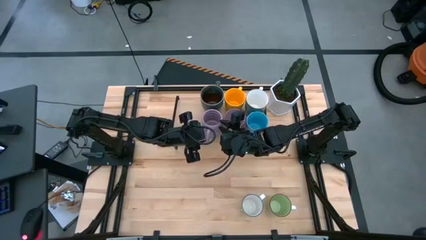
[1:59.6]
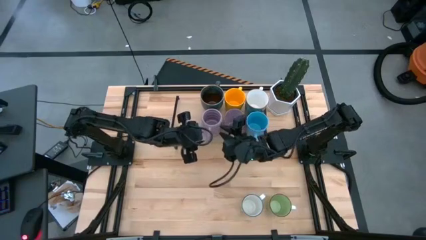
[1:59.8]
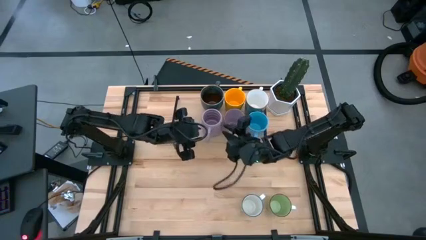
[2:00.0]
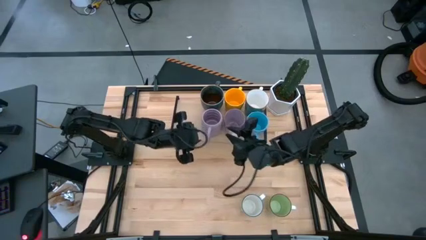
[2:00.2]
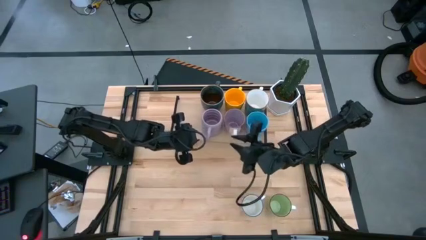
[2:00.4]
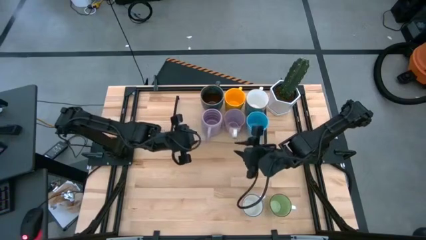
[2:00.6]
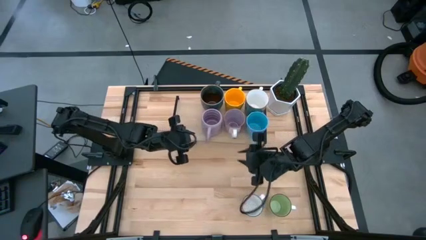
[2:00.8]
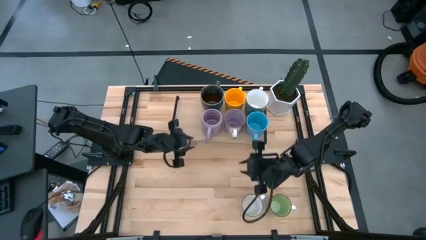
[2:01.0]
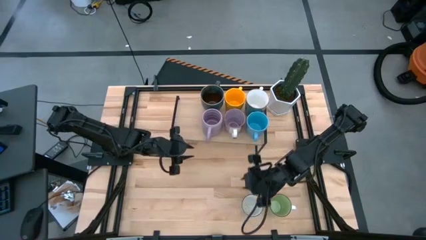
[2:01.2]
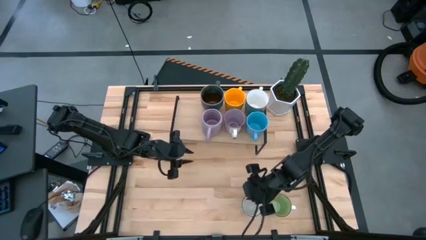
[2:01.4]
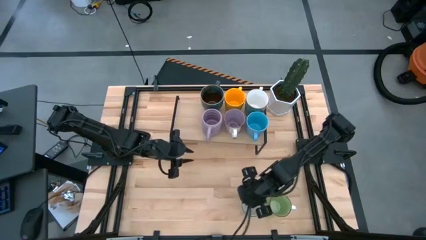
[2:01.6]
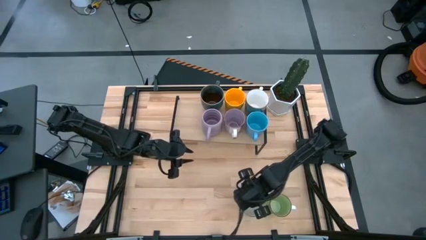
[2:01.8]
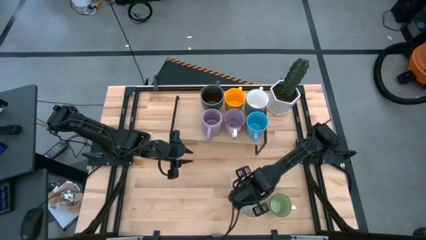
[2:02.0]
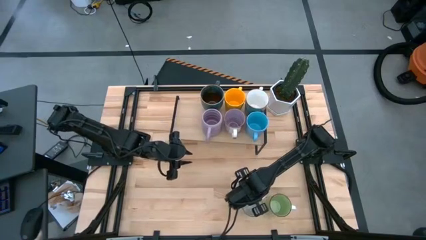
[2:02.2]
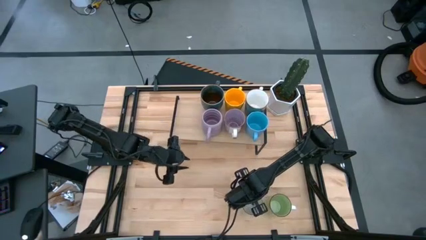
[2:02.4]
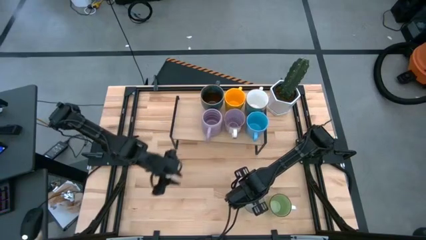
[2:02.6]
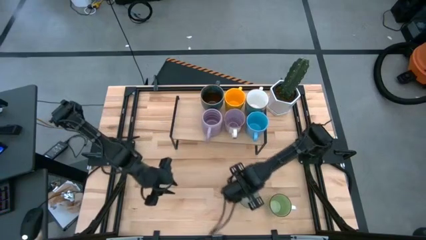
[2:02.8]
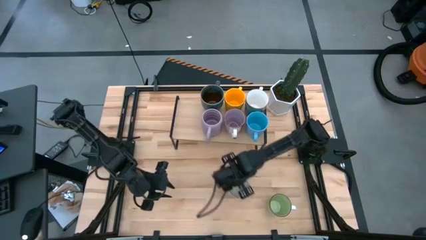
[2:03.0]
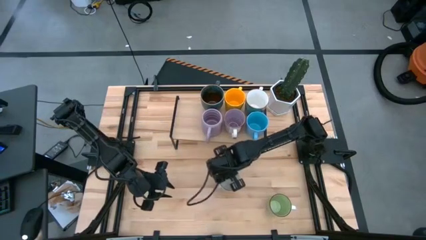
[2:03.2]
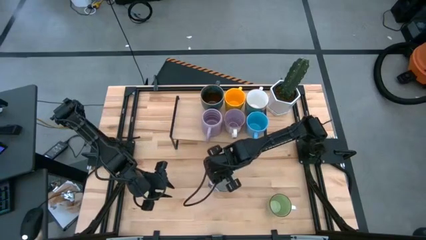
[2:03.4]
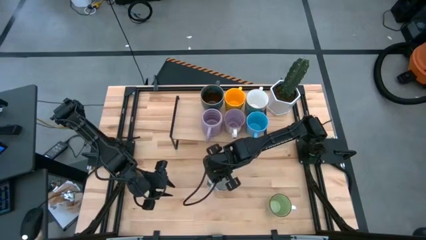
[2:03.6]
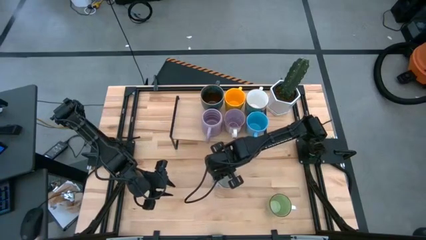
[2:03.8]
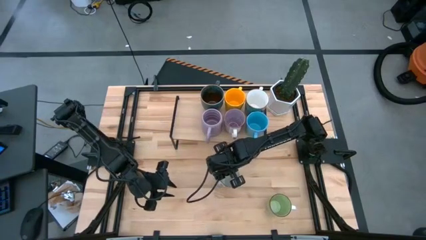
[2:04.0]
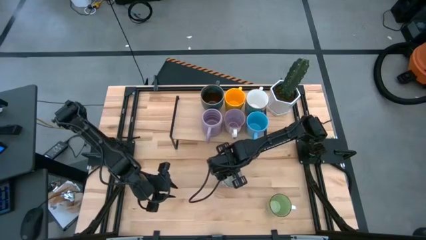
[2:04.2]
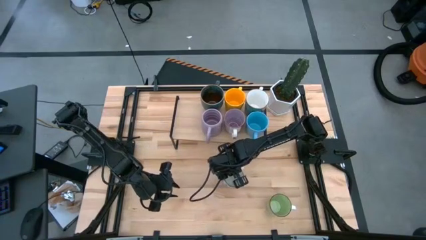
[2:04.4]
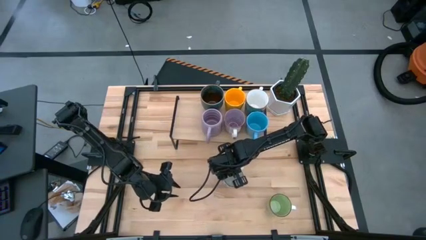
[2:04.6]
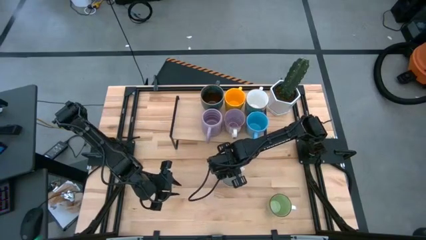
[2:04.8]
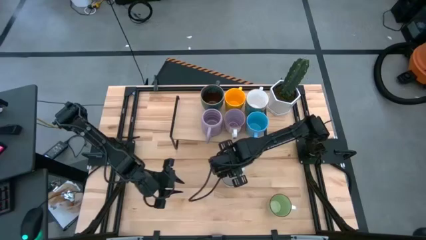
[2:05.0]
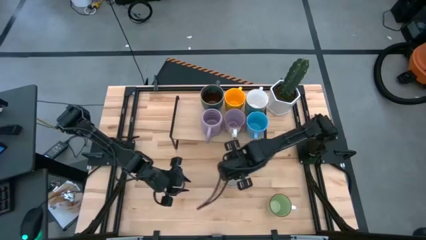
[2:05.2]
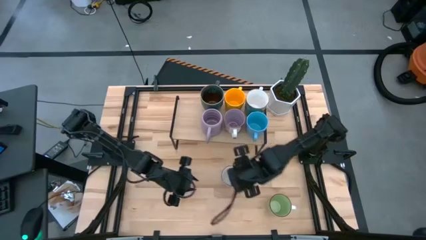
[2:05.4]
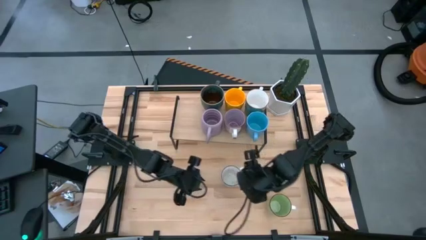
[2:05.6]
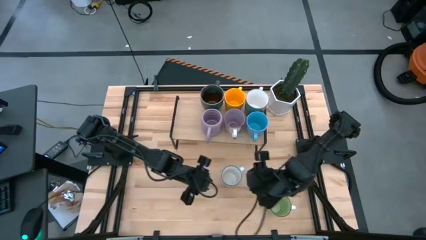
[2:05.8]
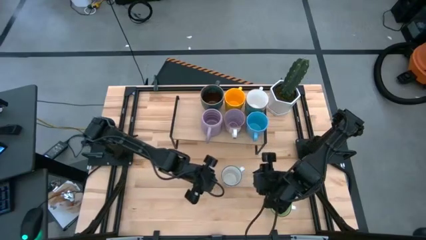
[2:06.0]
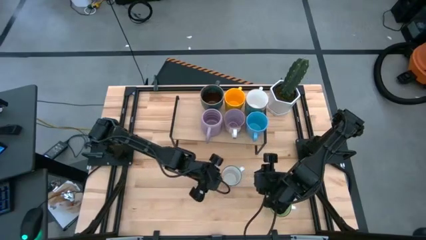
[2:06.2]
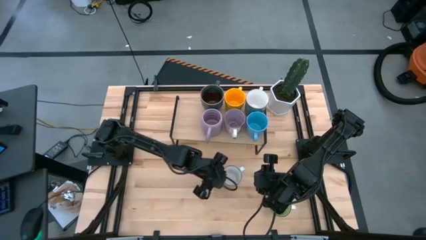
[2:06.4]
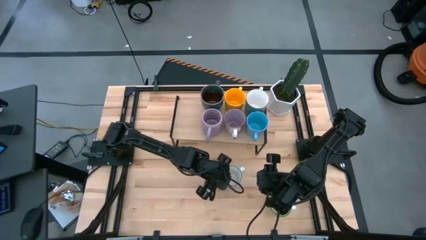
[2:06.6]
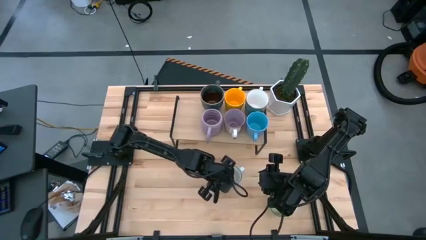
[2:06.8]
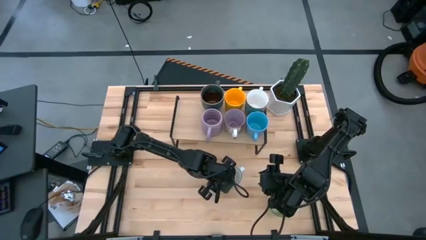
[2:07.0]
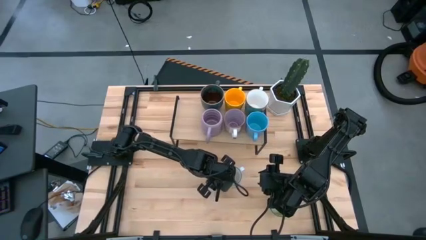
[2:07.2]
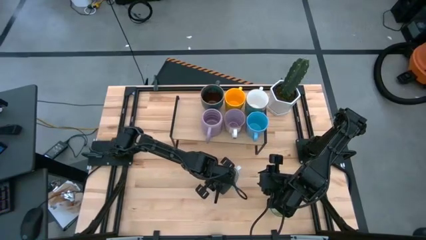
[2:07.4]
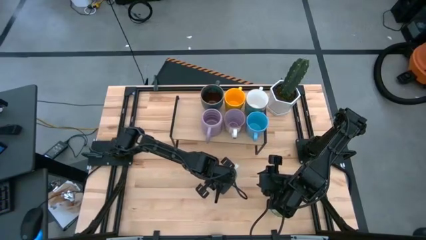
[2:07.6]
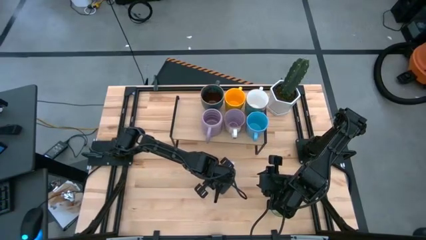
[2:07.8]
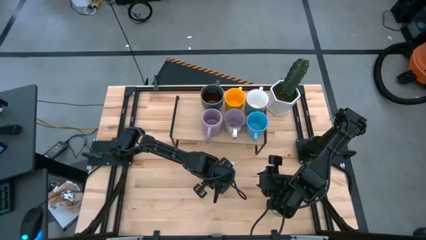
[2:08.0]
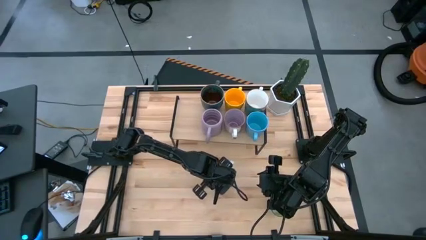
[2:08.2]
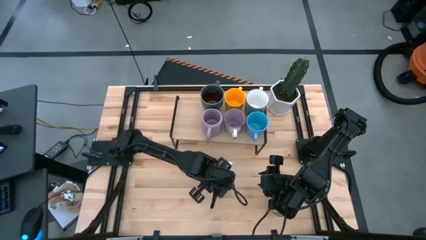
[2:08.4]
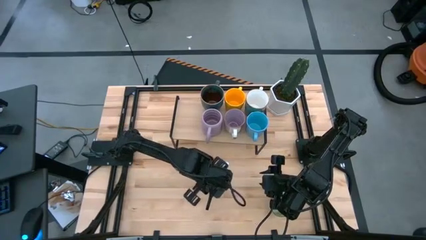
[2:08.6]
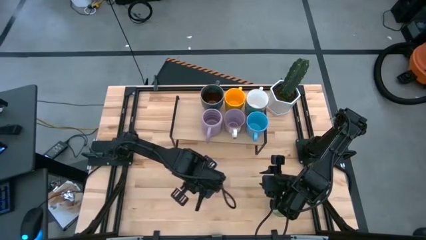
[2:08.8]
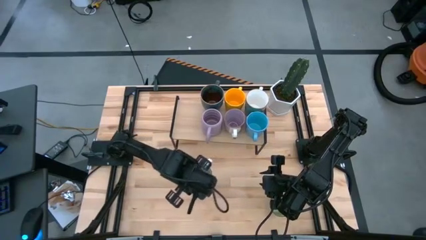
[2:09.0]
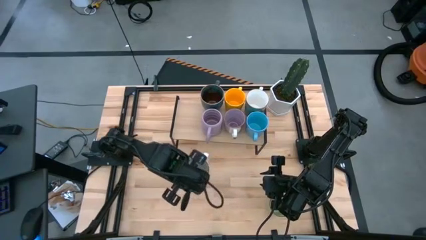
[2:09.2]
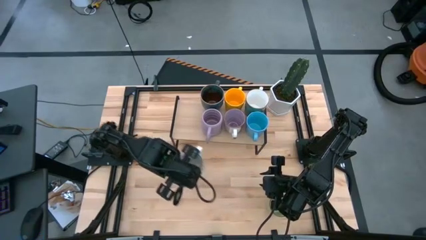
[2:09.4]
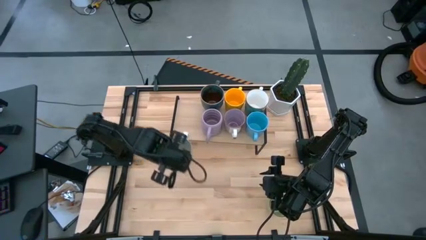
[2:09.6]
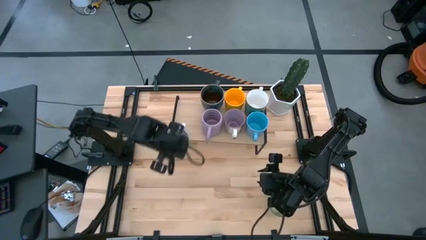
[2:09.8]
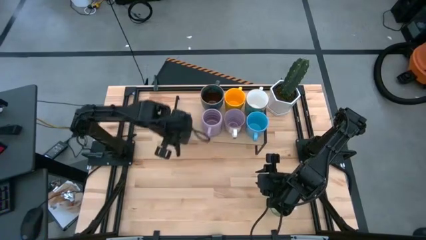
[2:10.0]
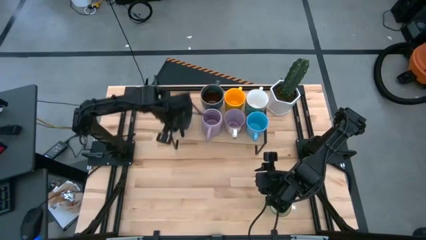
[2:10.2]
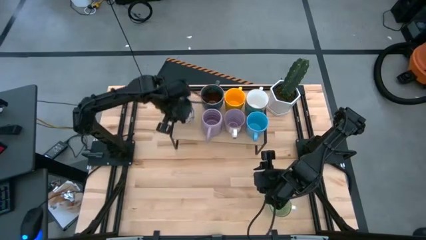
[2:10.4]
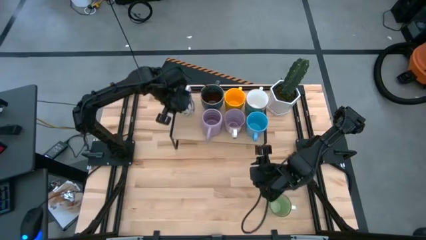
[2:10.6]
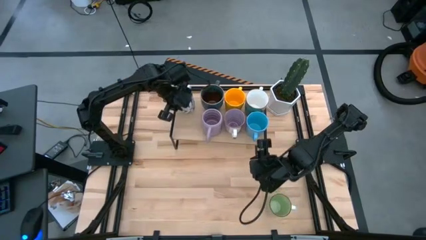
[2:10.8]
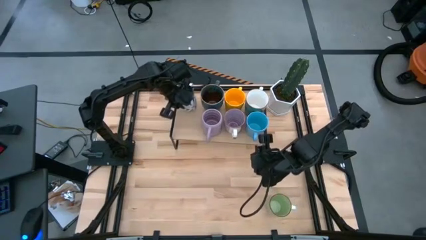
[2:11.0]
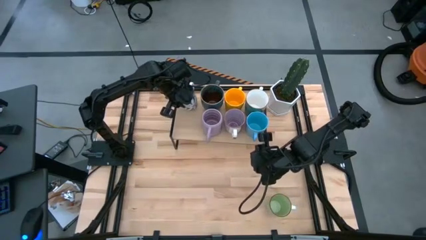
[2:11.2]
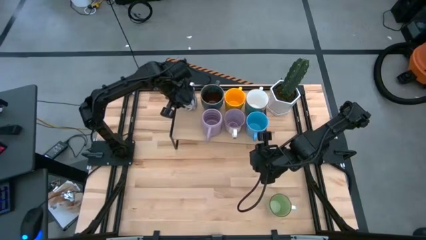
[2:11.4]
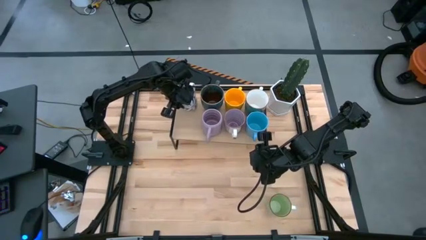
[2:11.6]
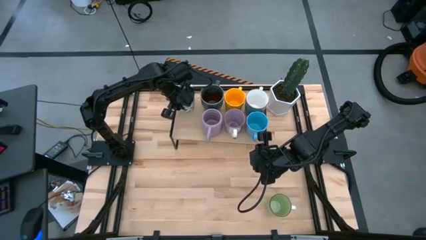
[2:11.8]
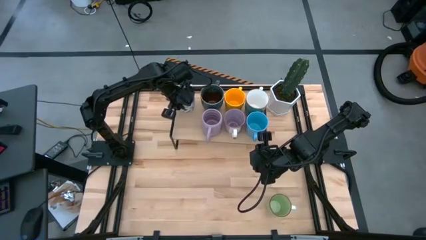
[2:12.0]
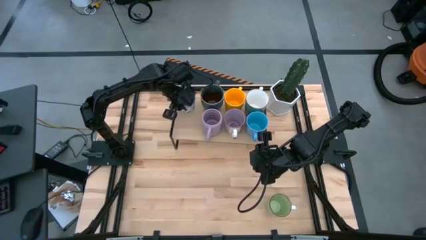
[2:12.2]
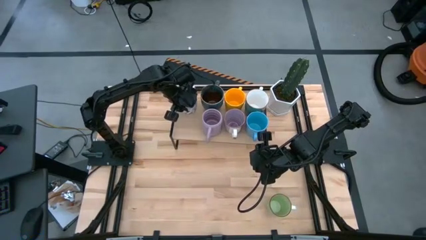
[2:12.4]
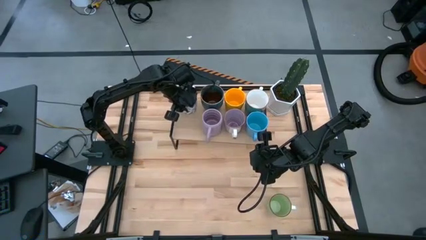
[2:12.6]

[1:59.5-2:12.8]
Task: Place coffee mugs
Put the blue patterned mug on the shelf

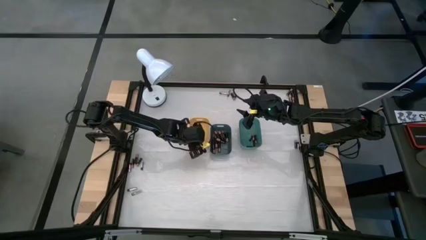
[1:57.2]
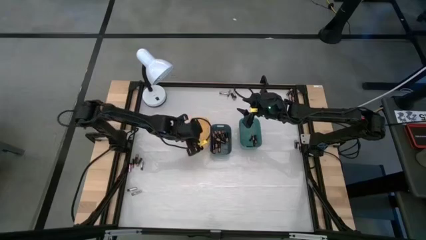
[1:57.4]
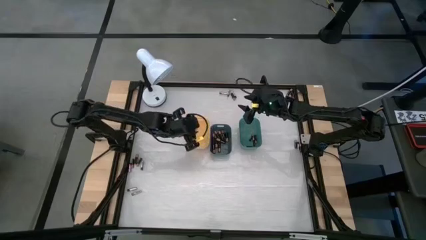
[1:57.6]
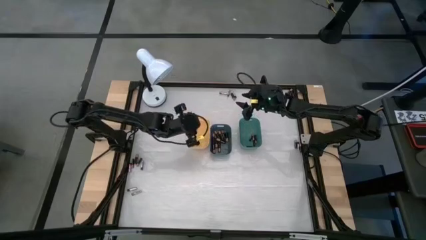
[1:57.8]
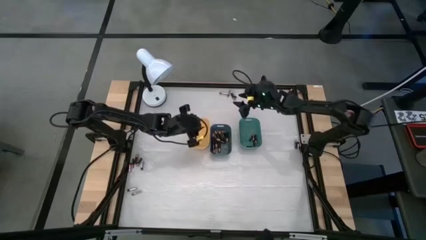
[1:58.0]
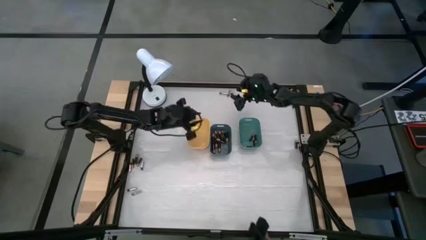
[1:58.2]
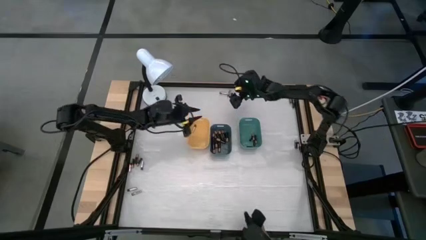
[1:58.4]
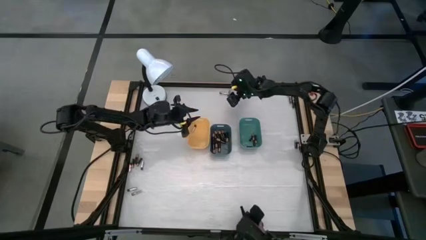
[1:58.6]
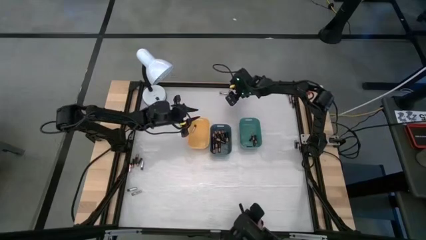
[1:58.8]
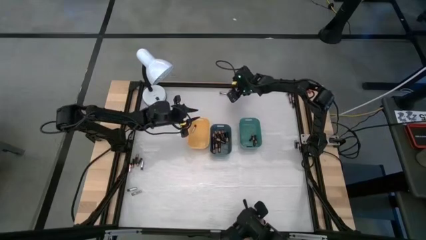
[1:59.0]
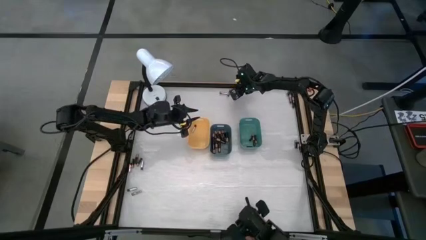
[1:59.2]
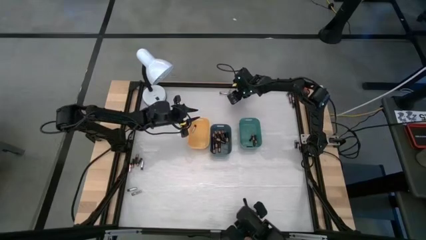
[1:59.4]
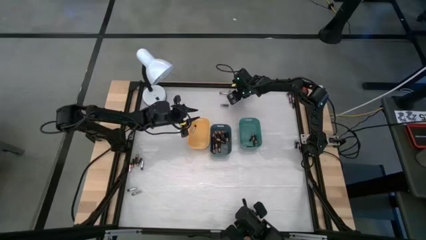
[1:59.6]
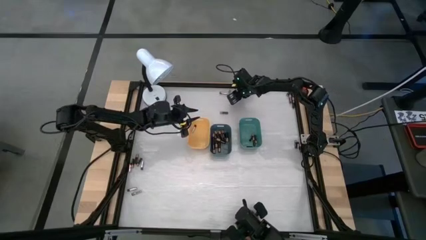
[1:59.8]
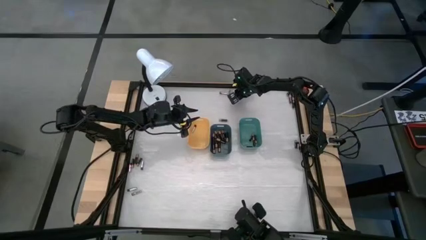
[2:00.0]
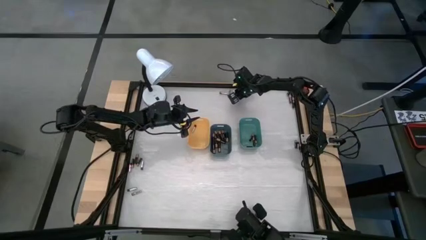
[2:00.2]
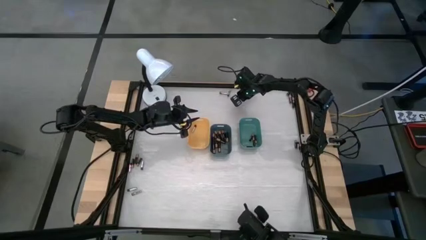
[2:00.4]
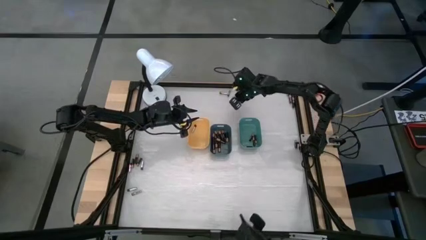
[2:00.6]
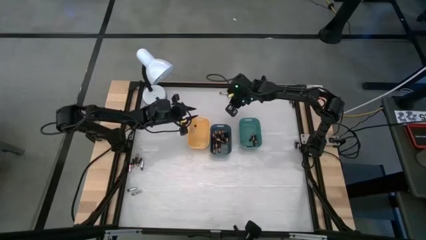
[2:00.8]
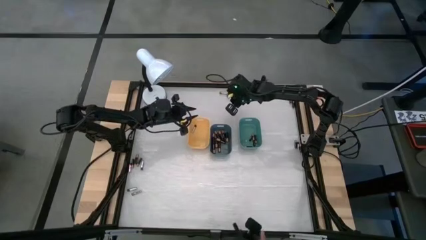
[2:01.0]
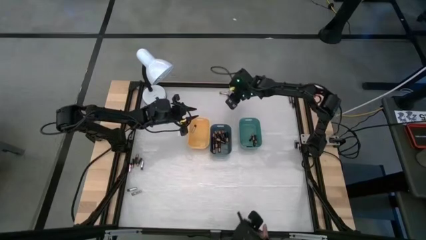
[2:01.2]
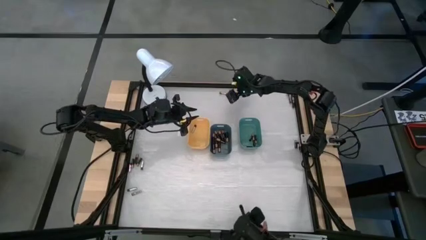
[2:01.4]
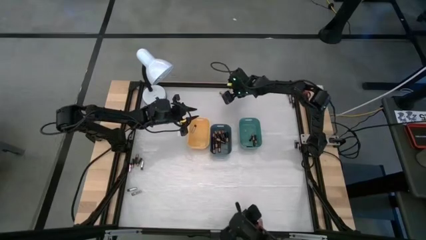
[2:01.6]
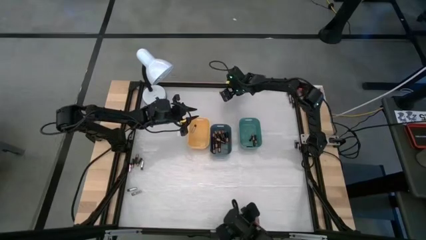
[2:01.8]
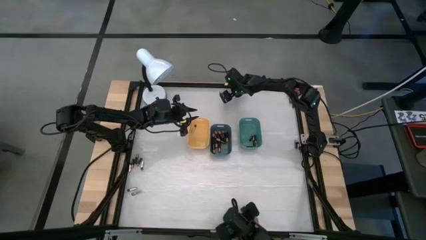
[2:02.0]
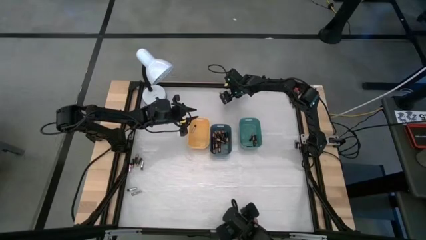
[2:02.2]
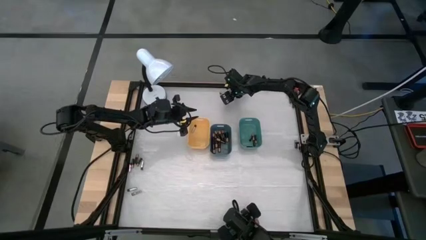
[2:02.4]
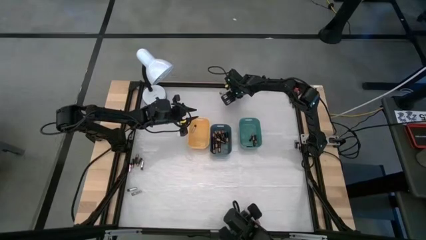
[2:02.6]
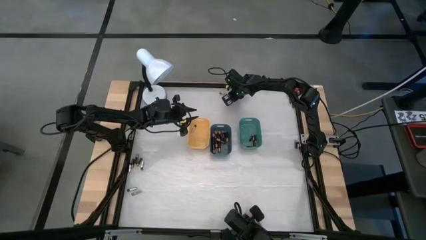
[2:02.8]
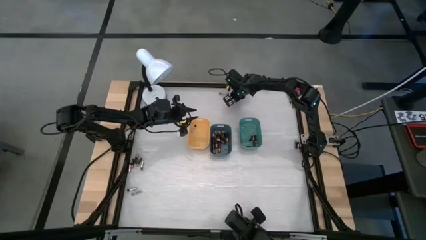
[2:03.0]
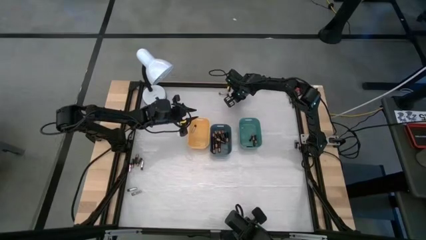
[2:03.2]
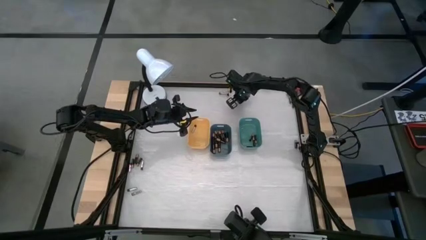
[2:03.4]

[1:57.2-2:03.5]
Task: Sort batteries
Put the silver battery into the yellow bin
